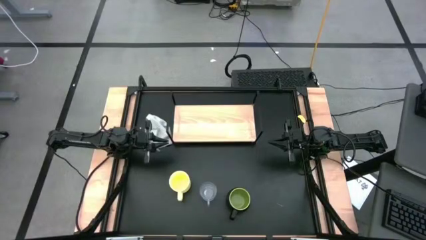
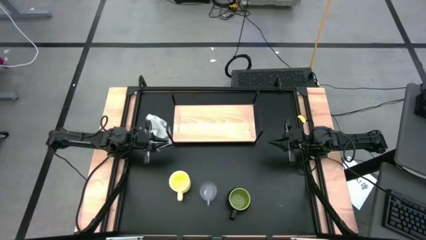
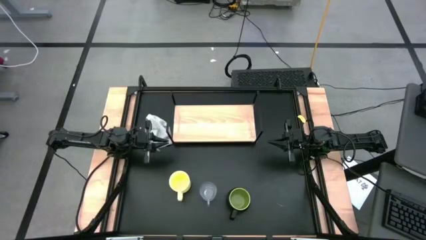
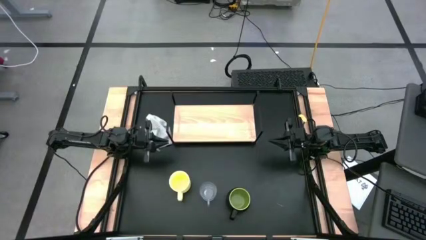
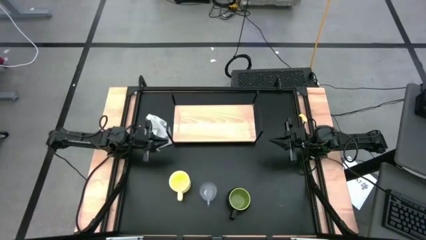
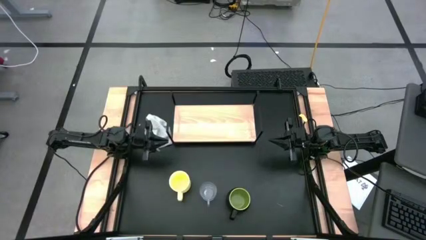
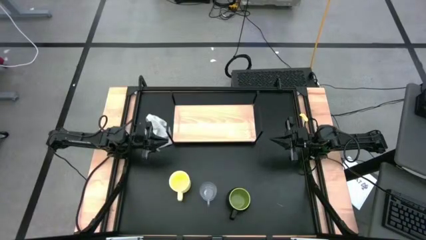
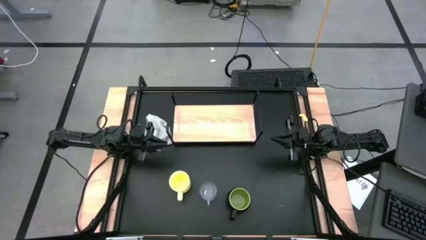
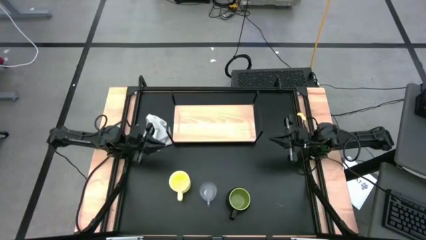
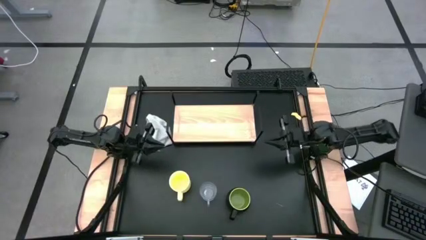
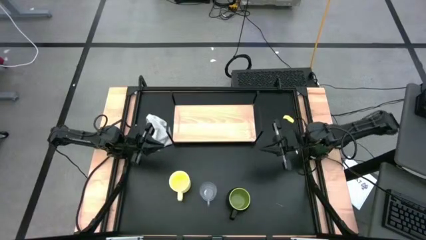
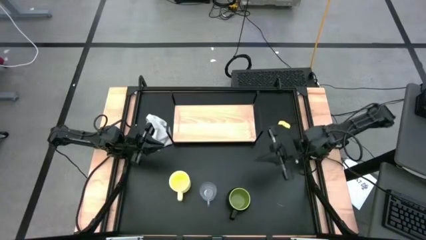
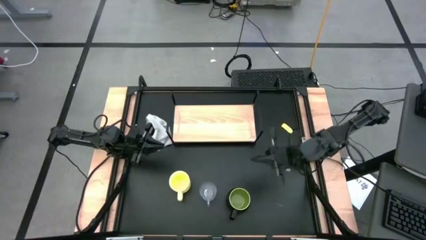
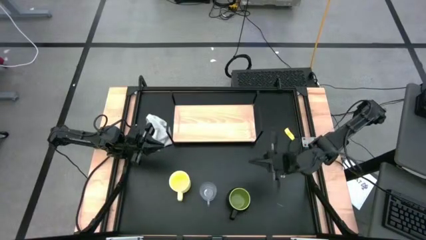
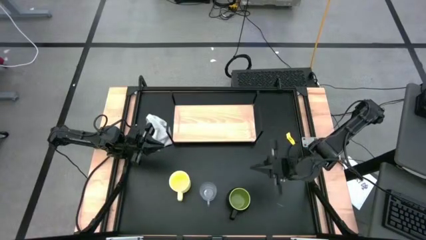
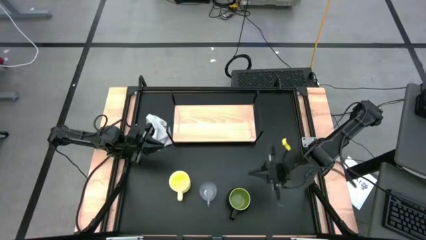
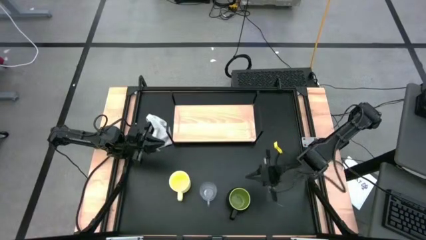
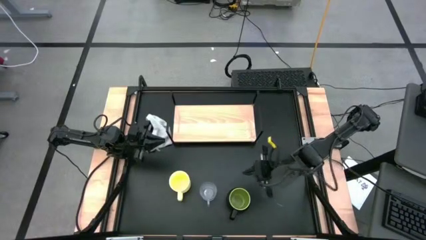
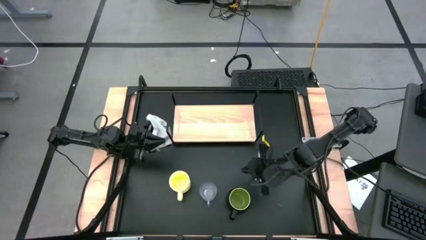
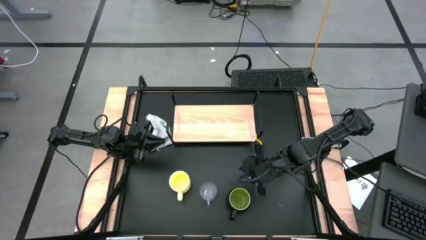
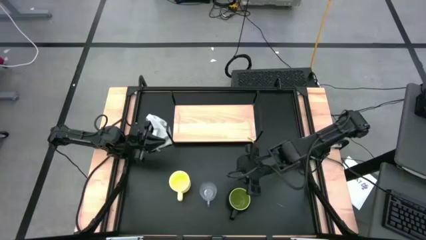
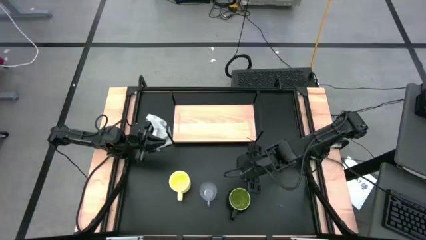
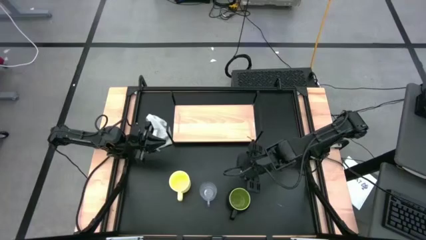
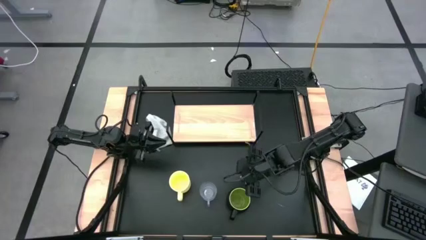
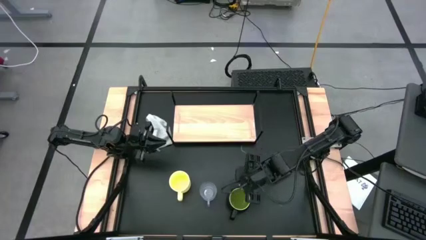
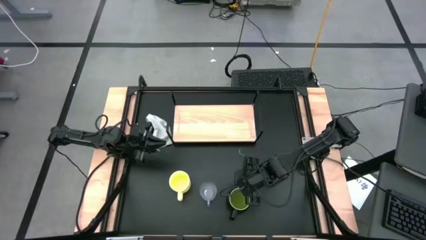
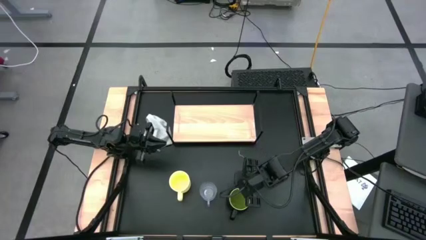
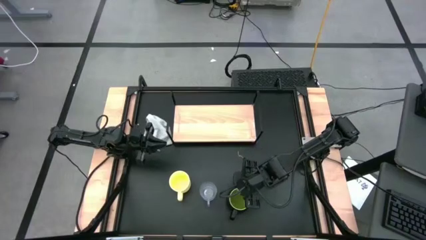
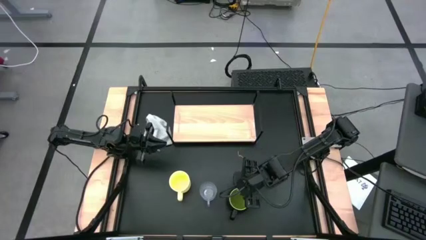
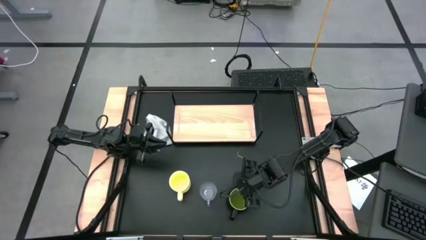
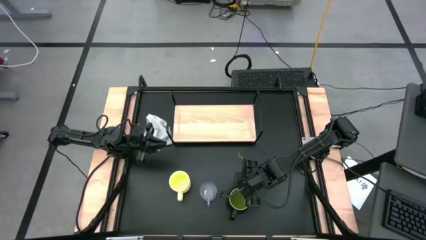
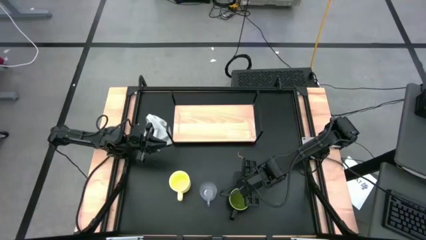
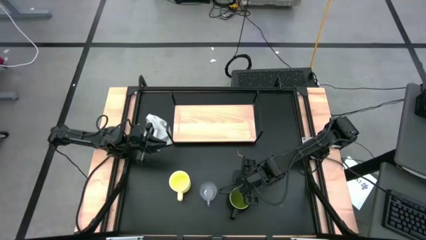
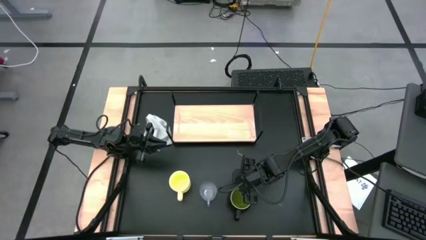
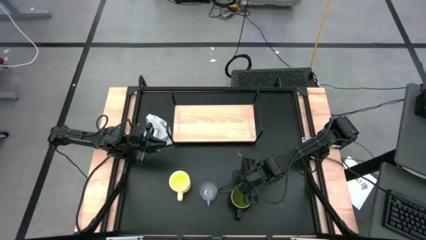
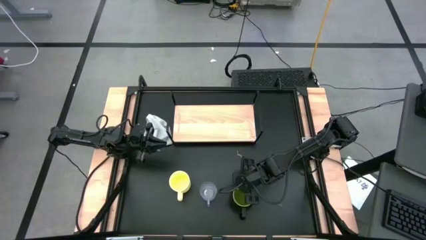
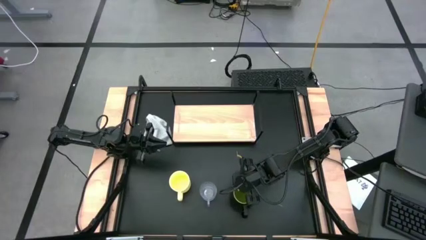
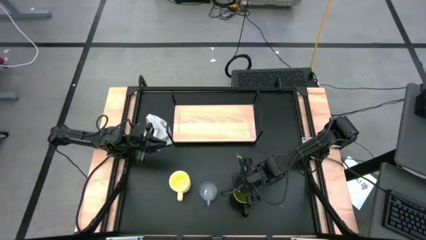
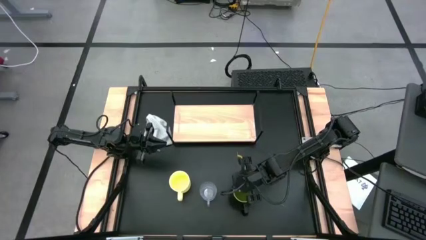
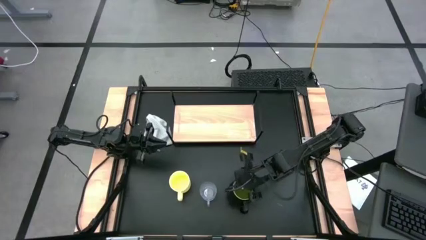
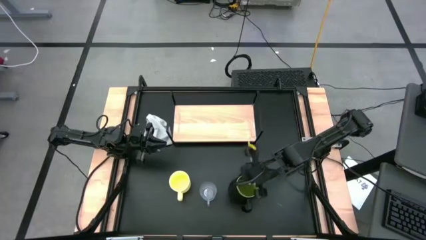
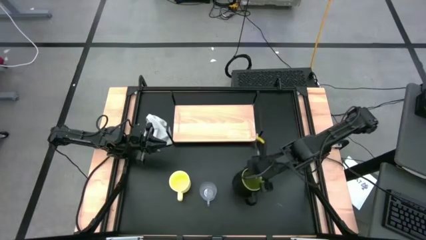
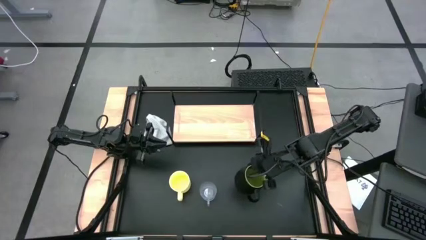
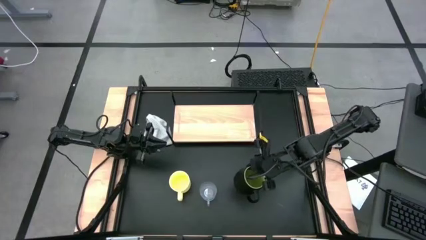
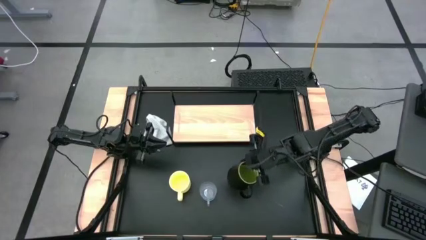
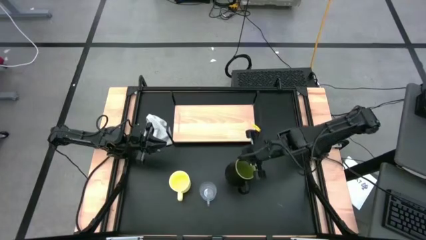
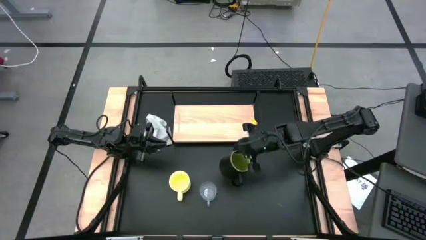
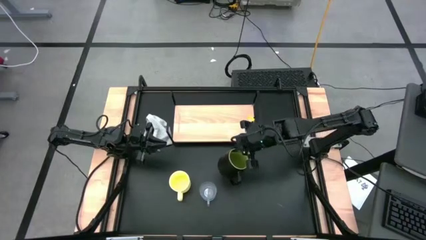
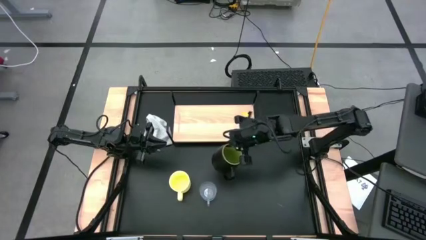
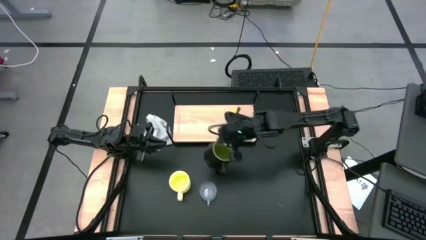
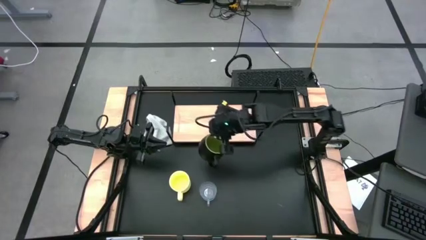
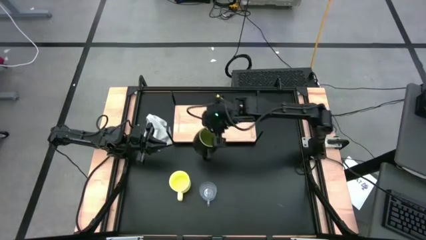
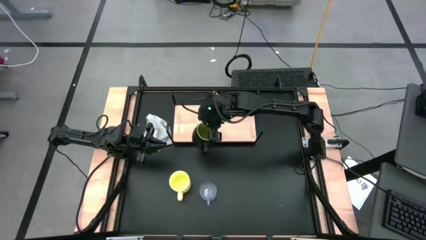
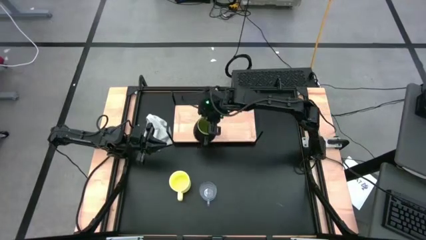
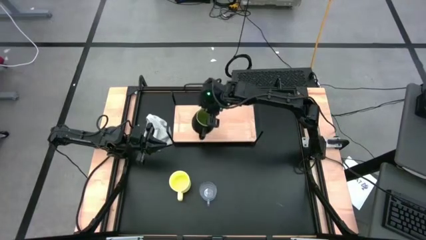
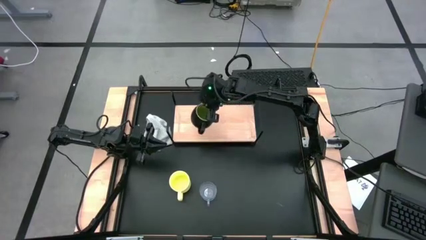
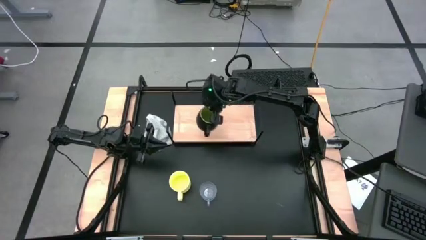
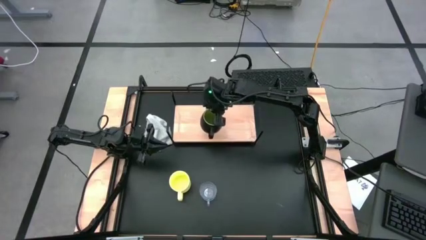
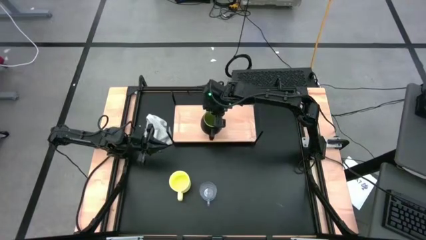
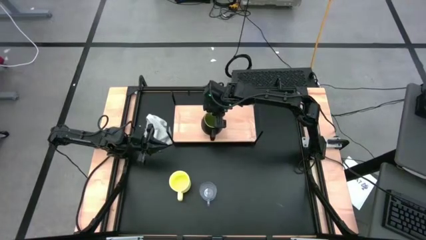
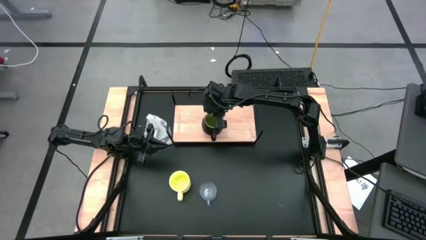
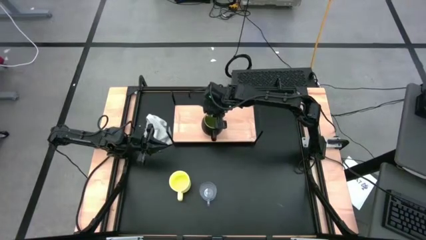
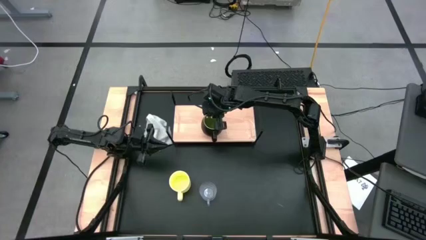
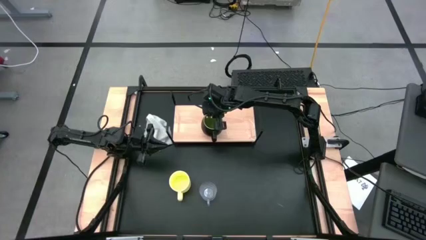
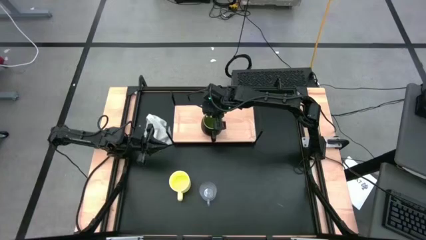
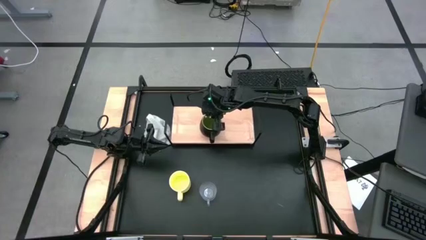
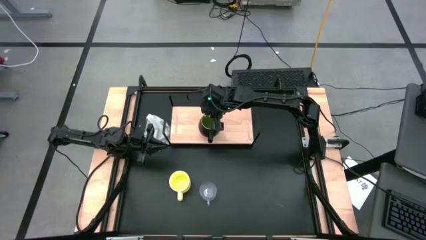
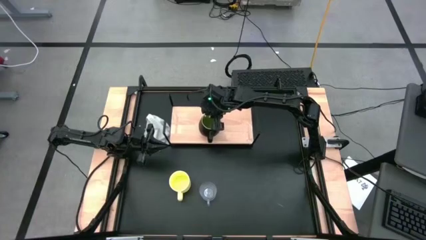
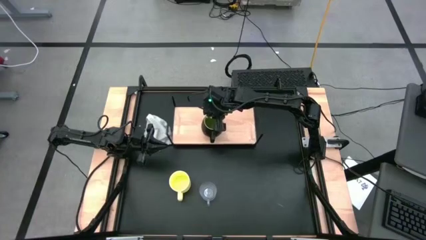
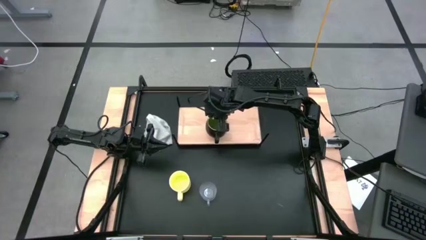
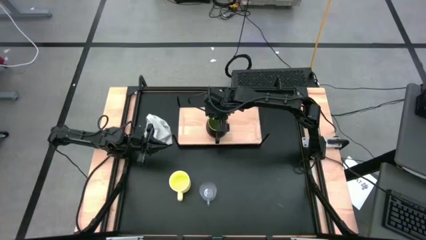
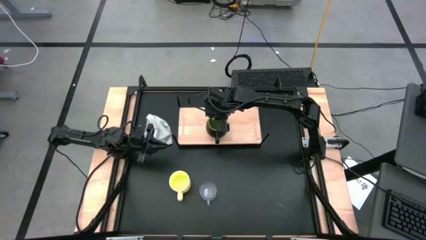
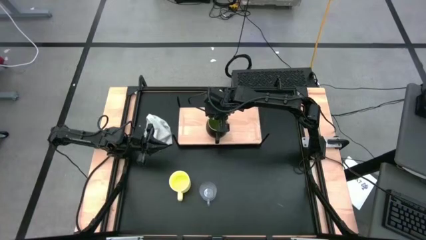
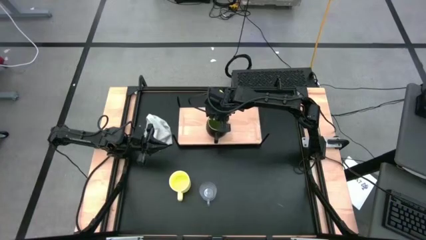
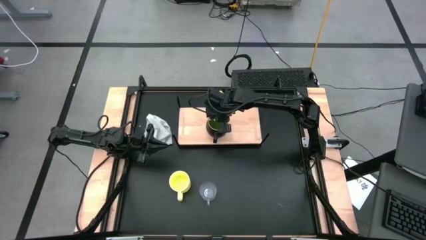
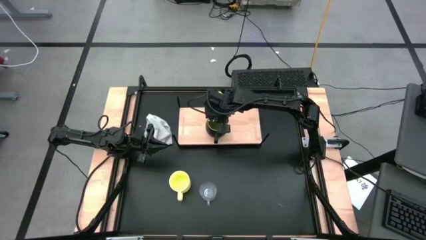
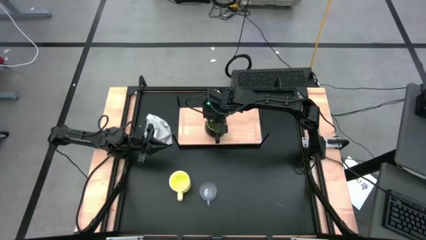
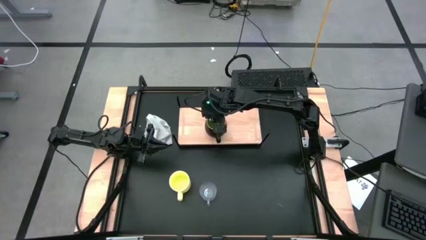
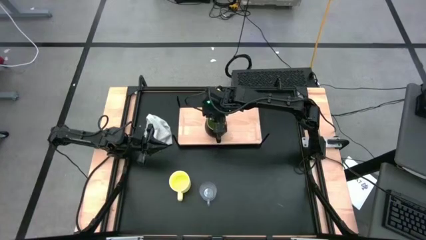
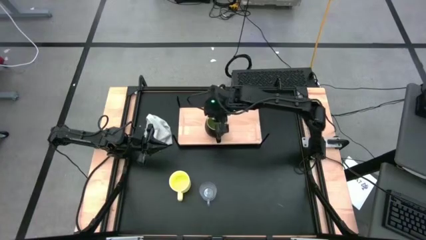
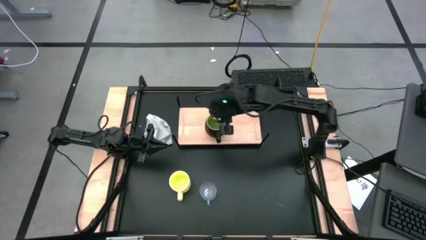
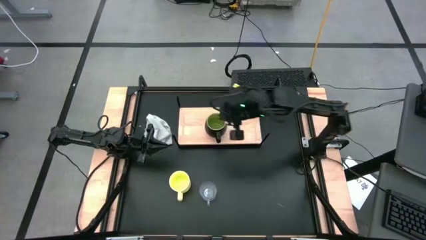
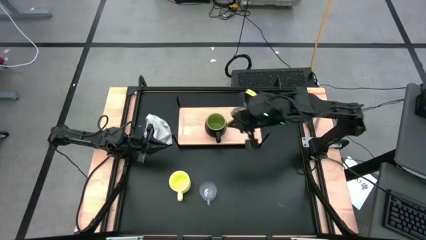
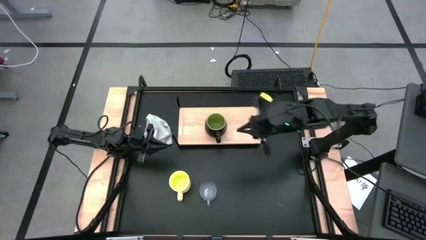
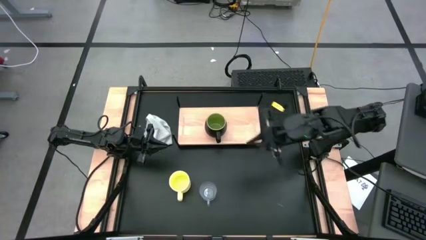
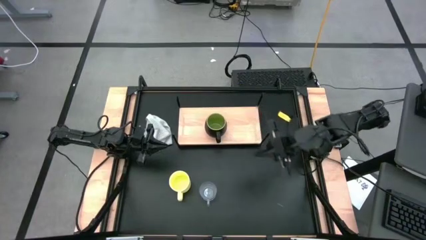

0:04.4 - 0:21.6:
Task: Stack small to large cups/mugs on shelf
Put the black mug on the shelf
